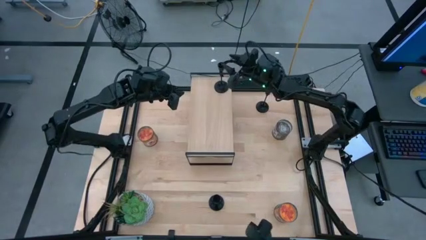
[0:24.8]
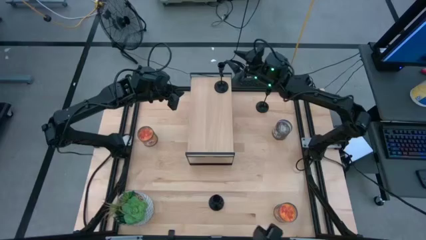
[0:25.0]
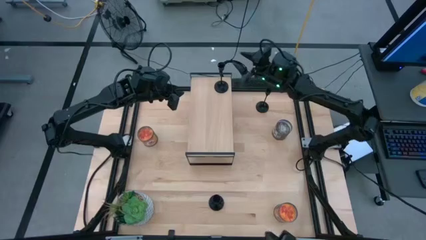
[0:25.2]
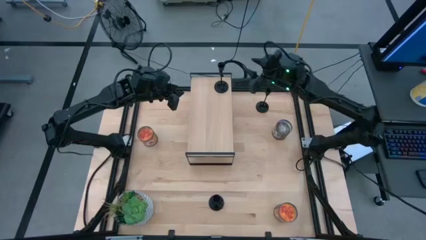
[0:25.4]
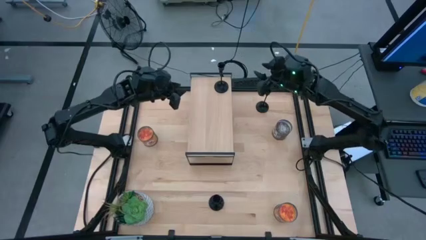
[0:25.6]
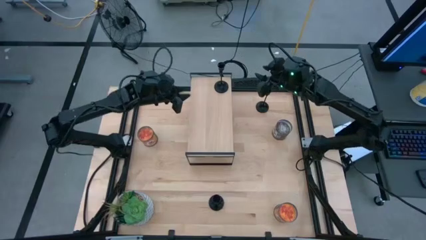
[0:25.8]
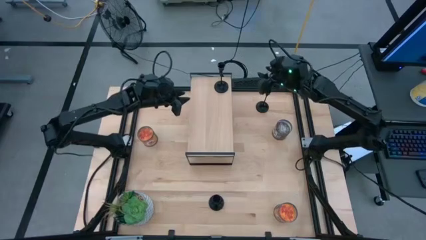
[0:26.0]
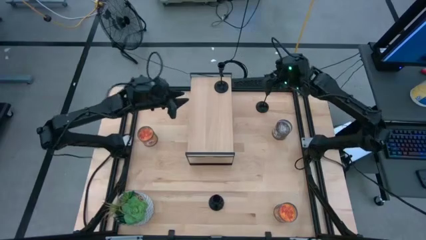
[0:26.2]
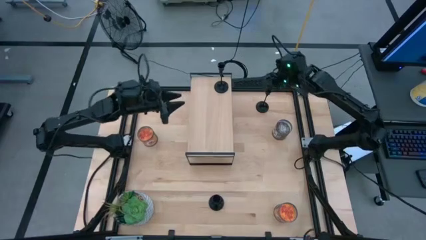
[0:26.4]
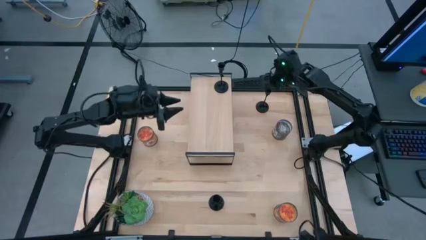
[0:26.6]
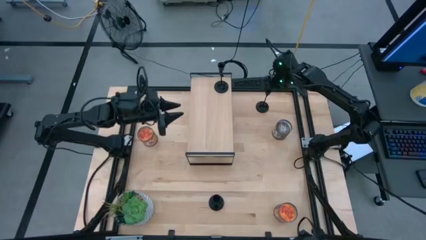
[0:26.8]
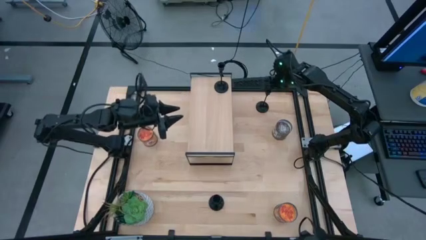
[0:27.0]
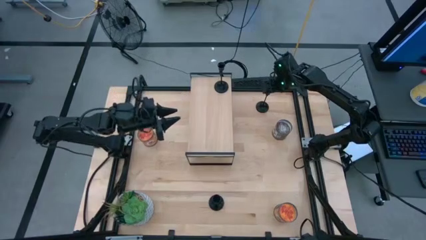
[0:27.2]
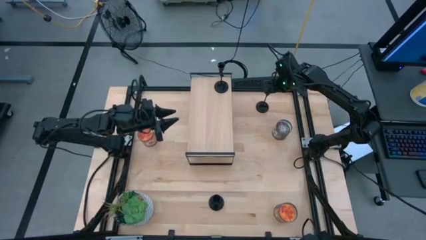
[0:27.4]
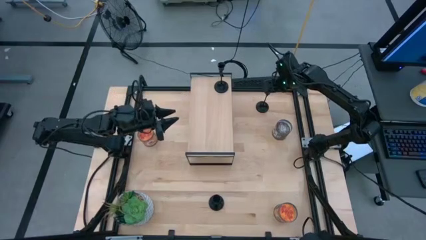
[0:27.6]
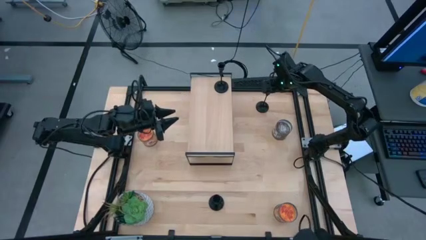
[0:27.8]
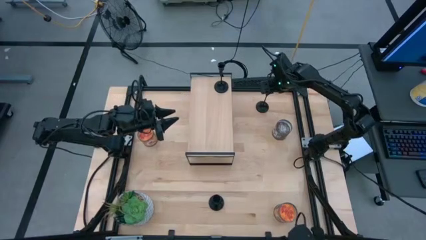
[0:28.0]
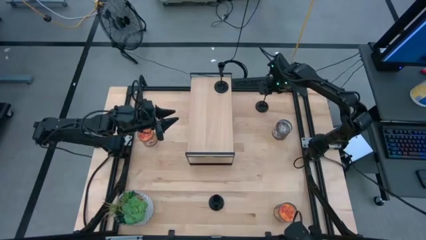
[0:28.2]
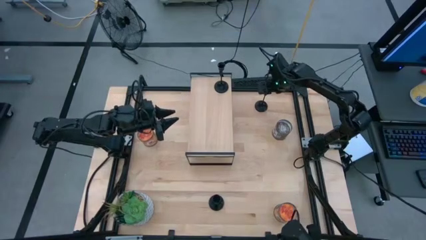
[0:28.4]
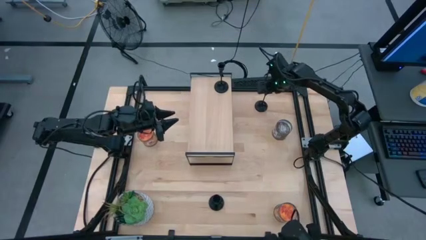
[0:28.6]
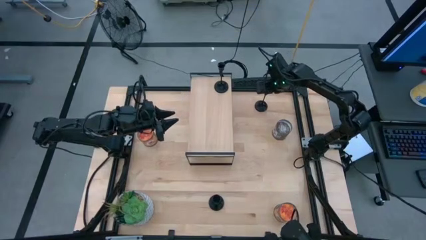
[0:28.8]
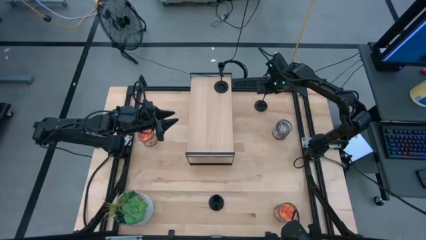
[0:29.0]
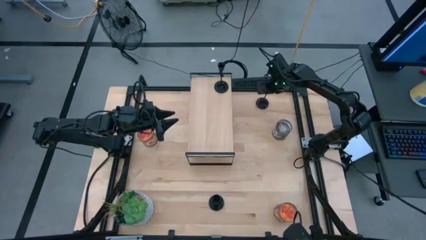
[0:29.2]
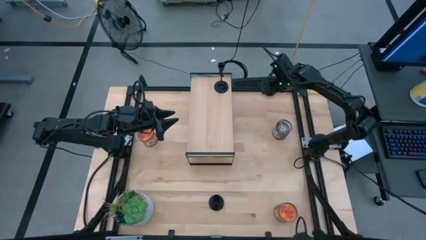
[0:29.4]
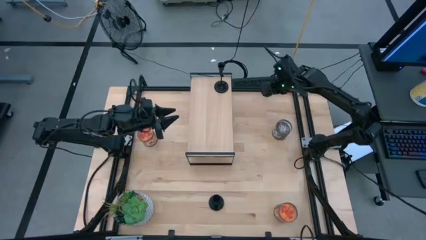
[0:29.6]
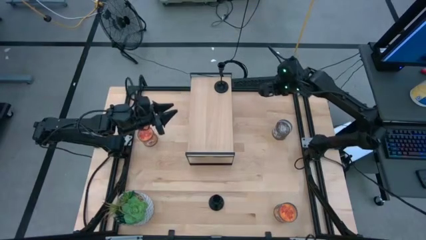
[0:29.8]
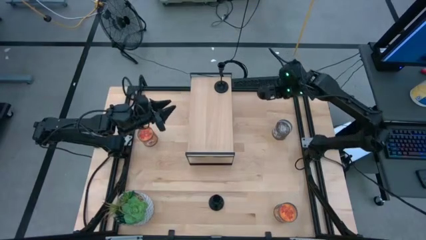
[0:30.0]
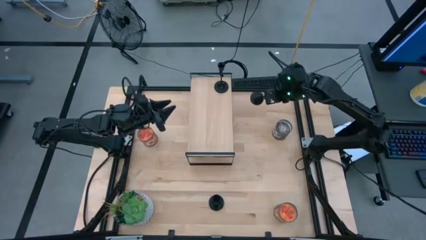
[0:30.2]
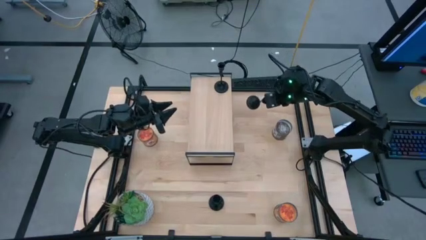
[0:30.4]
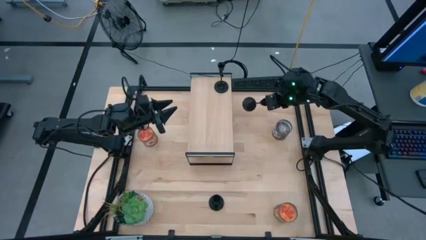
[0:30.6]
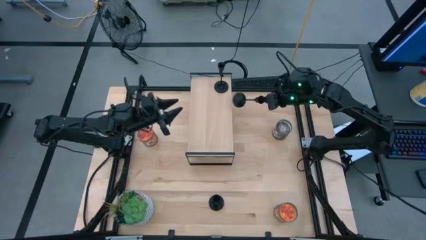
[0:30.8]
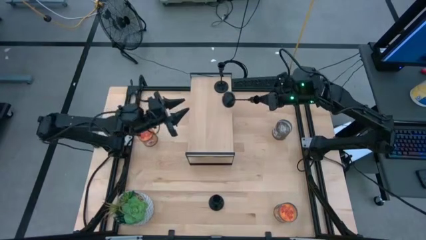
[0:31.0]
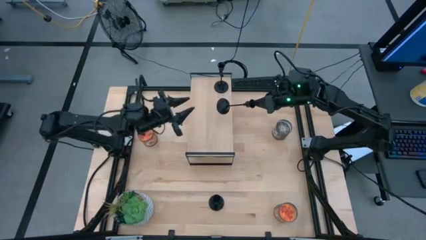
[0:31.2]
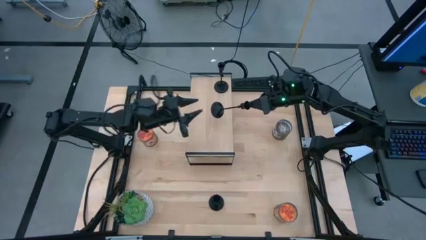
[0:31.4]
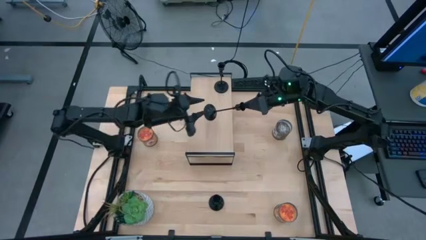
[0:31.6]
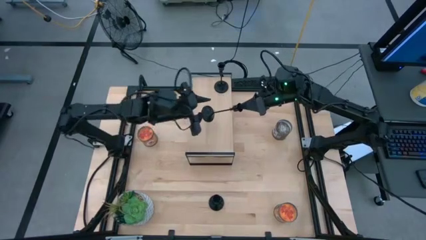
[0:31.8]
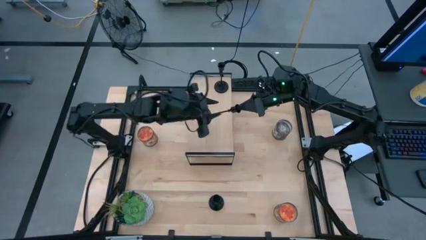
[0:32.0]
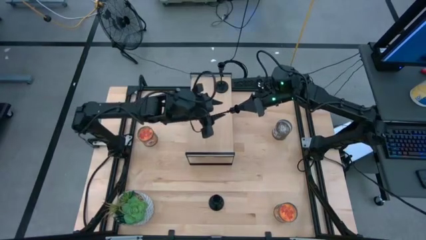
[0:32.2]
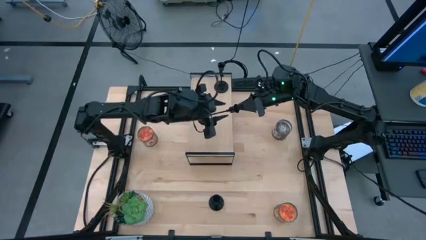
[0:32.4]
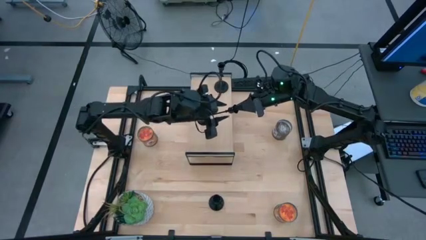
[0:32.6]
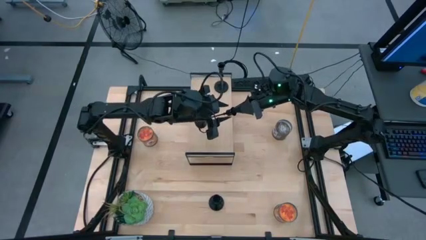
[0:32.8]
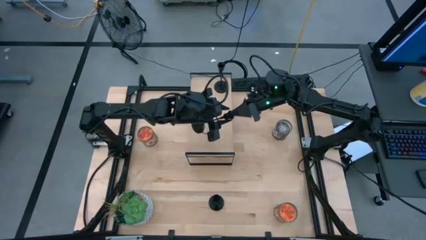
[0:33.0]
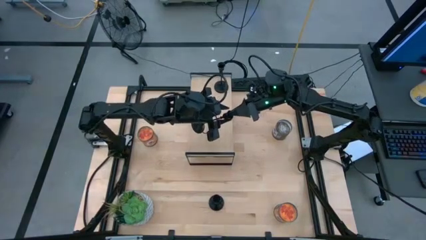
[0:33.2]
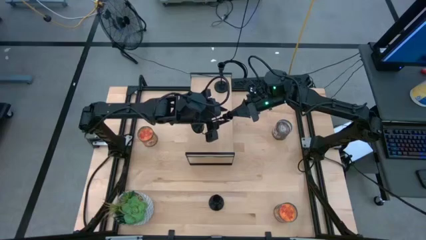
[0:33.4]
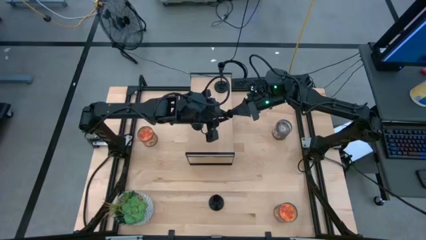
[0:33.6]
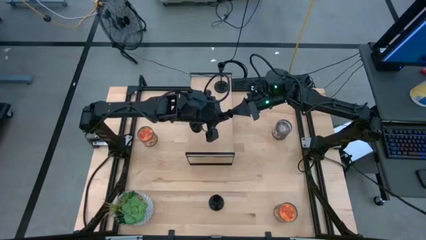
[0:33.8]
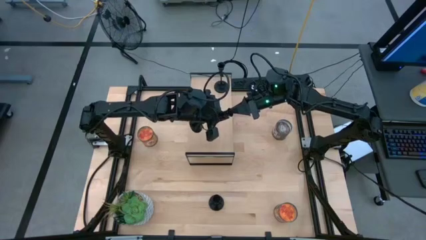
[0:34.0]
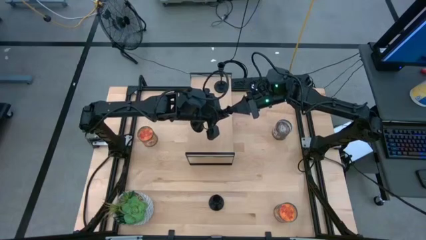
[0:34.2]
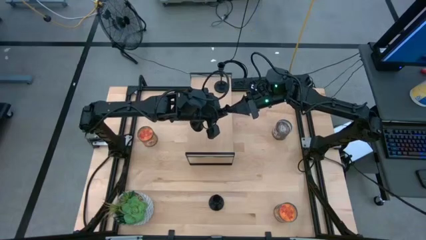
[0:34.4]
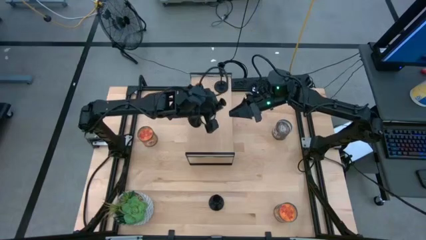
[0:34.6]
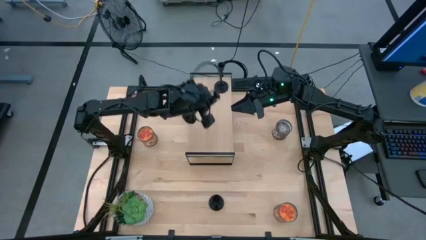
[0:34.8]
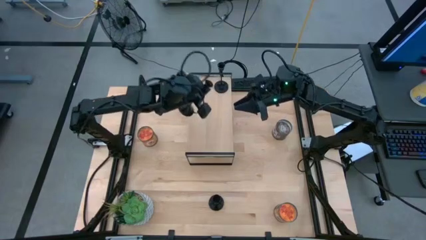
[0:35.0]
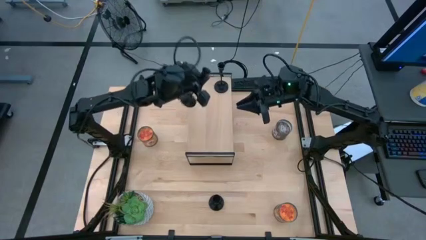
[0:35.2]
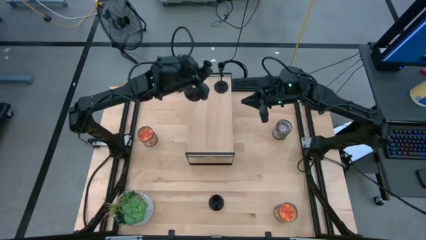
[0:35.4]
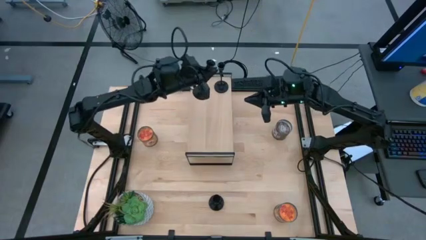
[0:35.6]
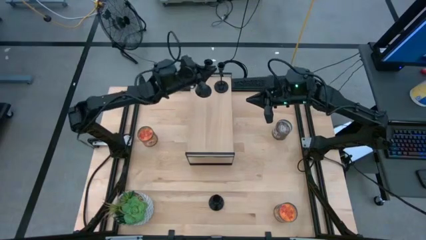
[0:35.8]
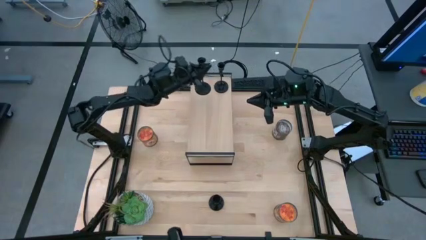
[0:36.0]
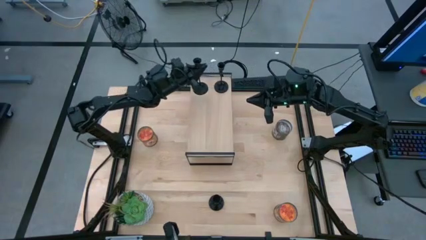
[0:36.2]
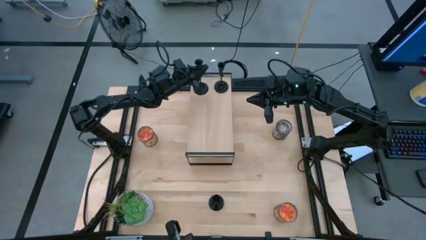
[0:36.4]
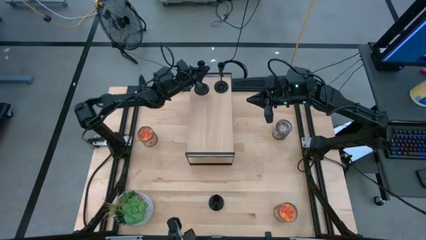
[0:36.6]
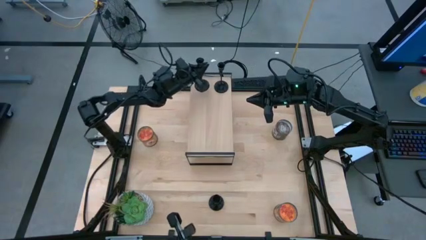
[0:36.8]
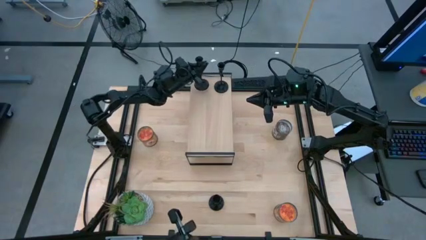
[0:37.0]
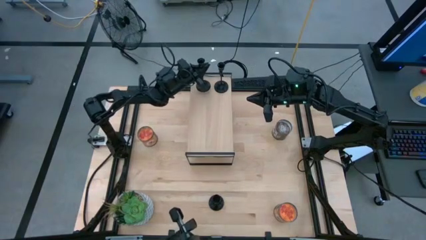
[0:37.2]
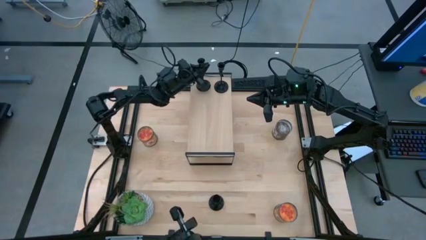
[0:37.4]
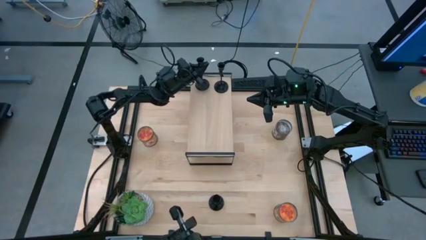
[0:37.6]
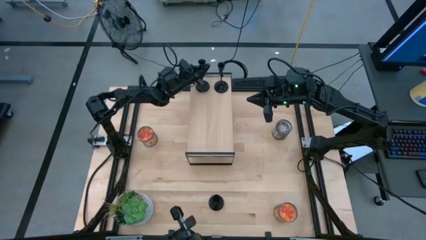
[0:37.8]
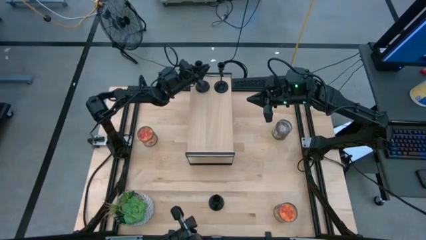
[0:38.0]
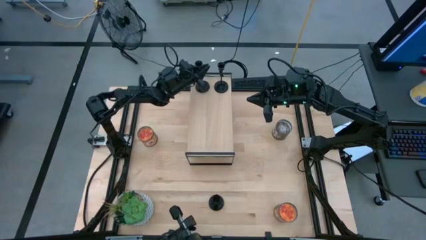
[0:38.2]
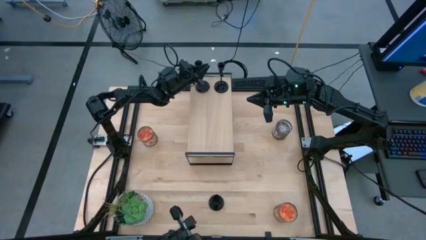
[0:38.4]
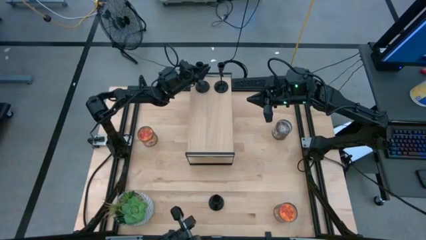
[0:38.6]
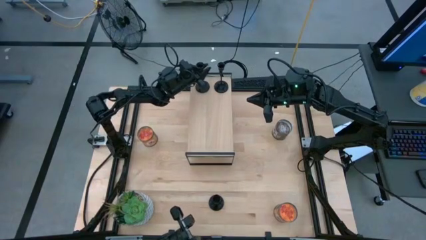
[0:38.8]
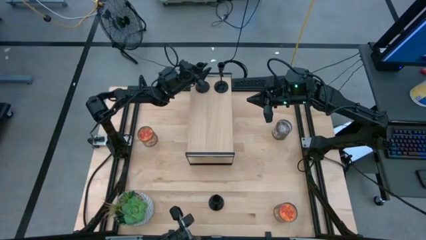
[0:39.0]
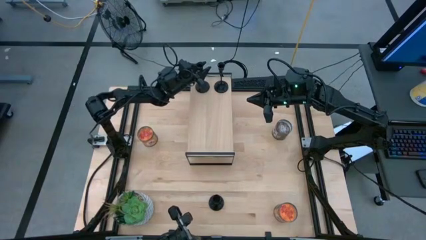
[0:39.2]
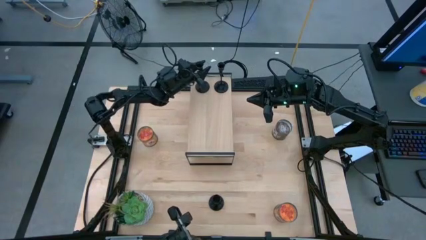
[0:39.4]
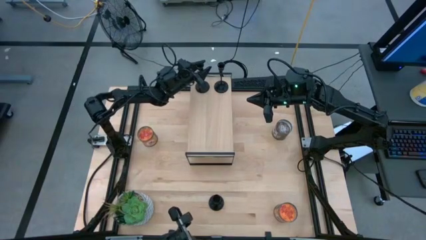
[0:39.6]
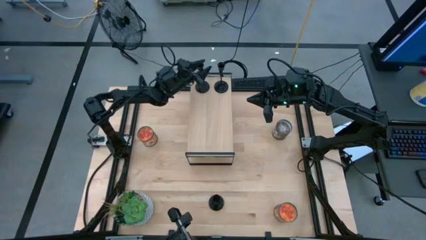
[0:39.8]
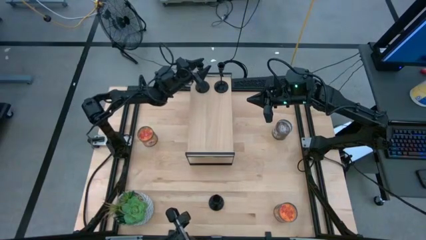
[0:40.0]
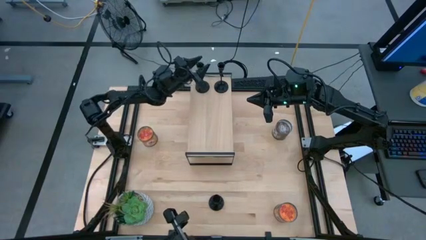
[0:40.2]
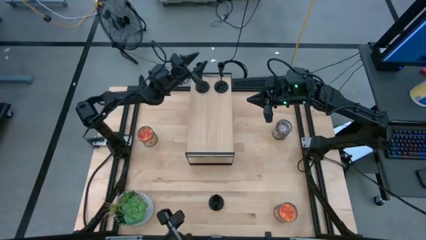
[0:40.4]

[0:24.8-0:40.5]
Task: Pick & Place candle stick holders
Put the top black candle holder on the shelf
